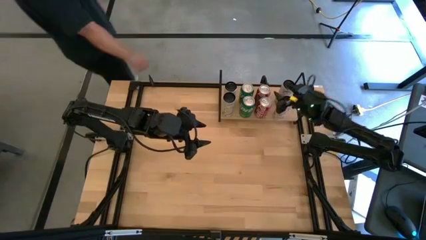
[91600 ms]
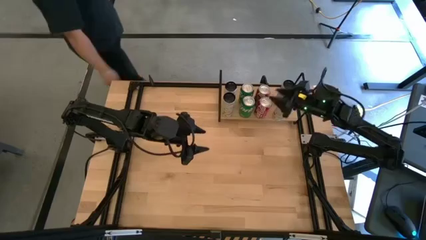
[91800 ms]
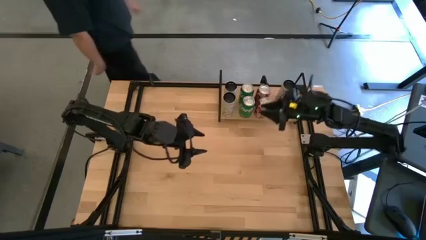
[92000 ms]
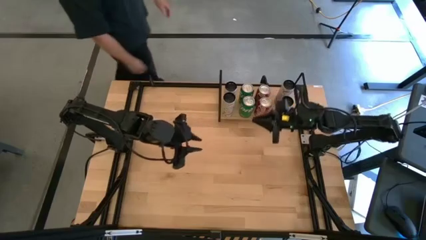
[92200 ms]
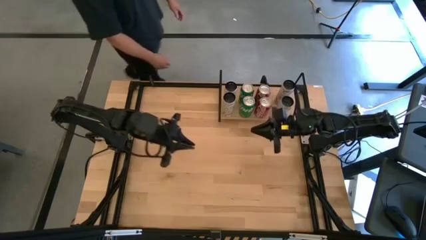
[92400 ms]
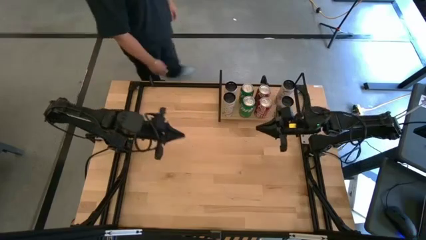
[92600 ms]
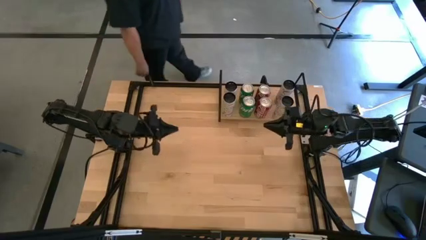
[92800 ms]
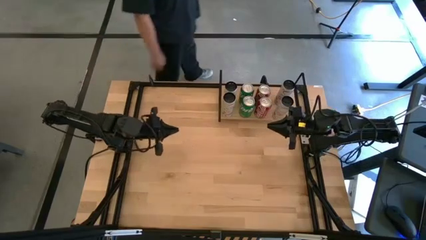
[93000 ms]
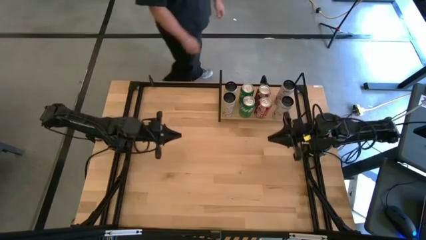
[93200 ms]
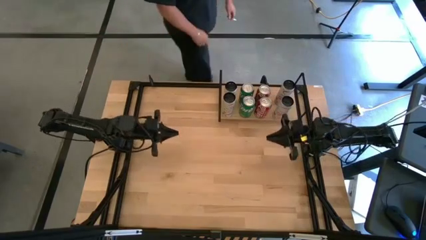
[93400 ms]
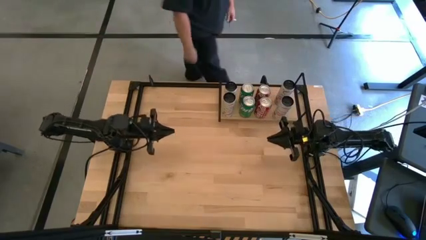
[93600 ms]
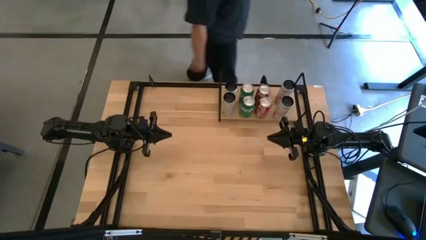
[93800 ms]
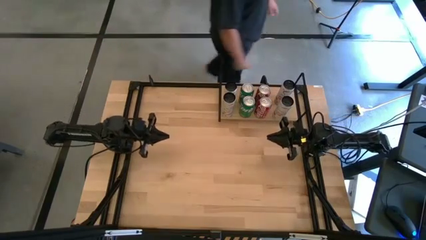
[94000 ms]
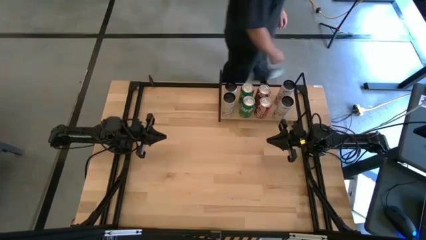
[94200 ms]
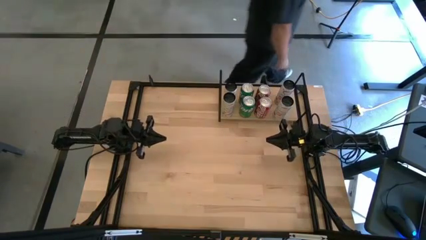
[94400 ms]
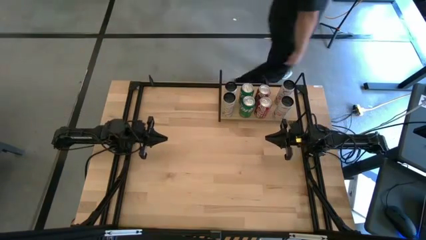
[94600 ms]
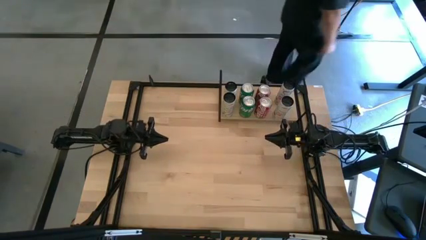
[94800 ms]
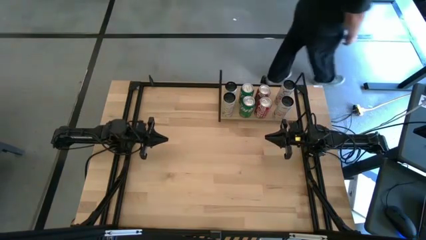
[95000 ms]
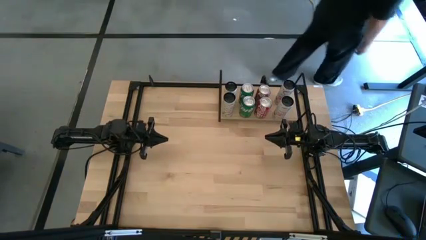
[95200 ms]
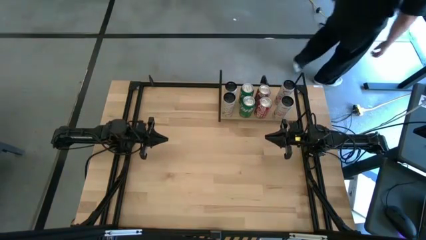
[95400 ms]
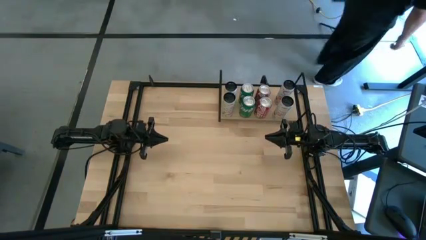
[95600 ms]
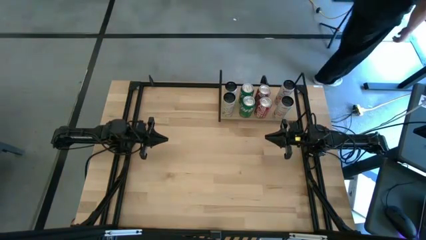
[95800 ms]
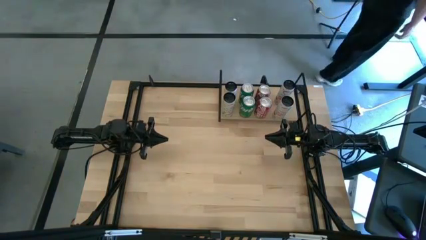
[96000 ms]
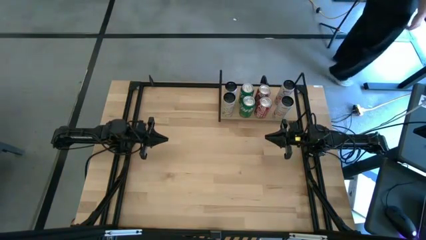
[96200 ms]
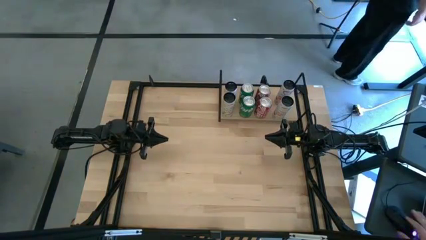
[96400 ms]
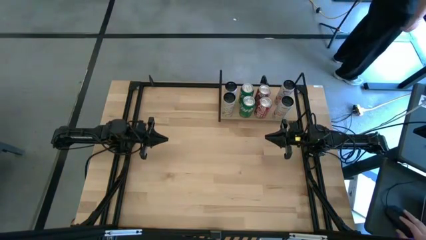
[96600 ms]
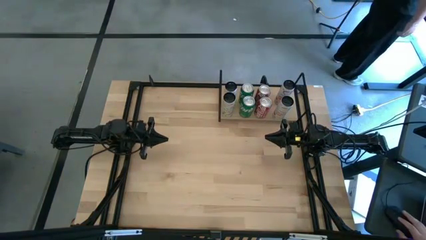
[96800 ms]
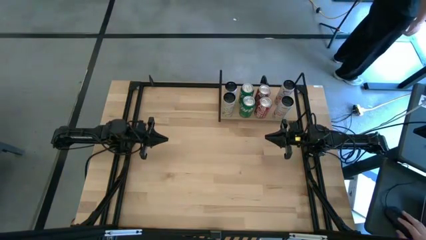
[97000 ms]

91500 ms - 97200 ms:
Task: Place canned beverage on shelf
Return to Home Position

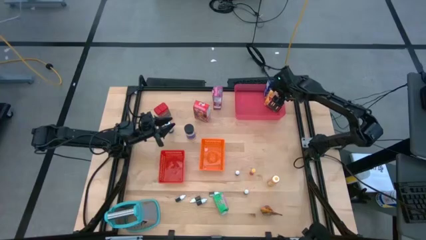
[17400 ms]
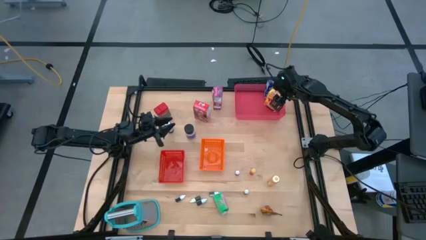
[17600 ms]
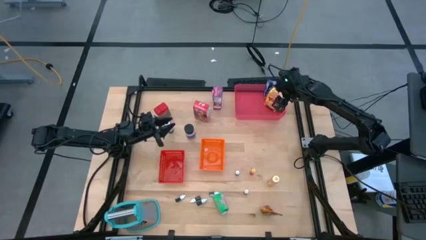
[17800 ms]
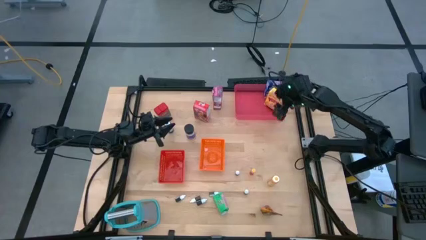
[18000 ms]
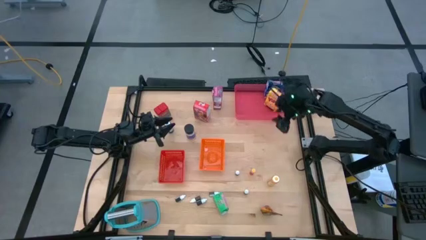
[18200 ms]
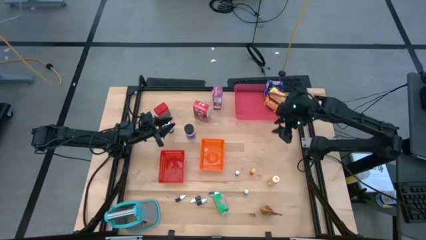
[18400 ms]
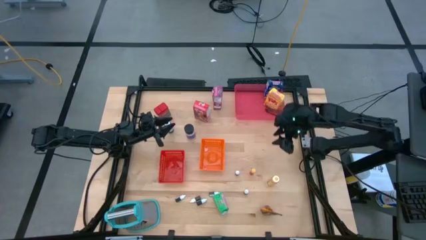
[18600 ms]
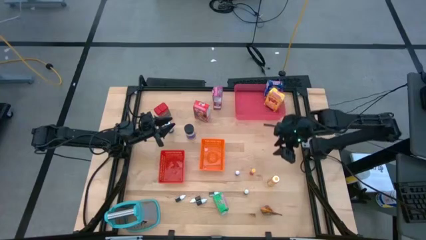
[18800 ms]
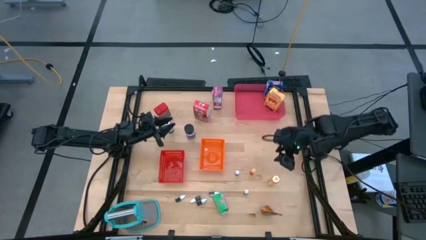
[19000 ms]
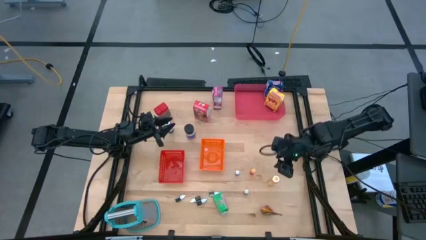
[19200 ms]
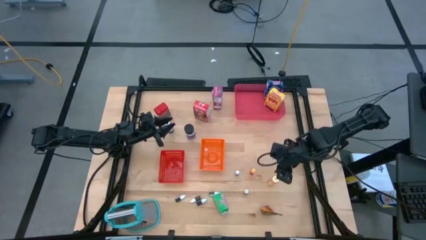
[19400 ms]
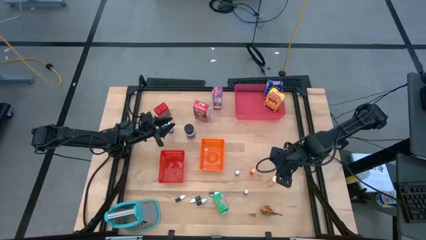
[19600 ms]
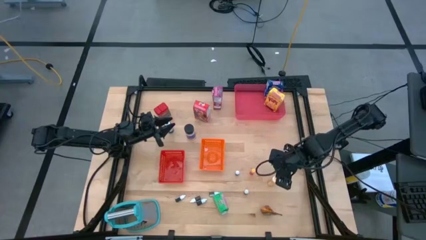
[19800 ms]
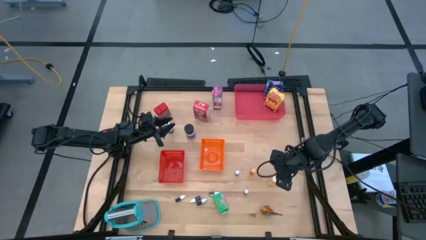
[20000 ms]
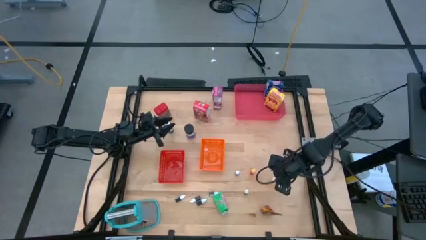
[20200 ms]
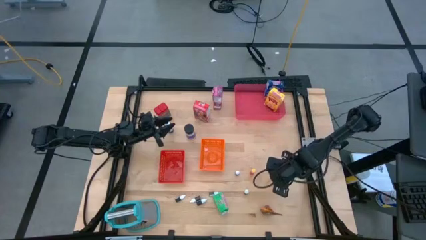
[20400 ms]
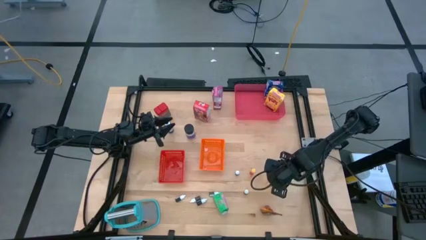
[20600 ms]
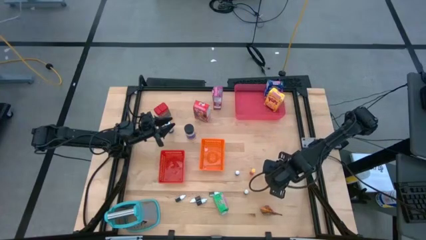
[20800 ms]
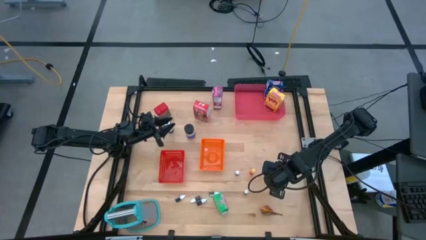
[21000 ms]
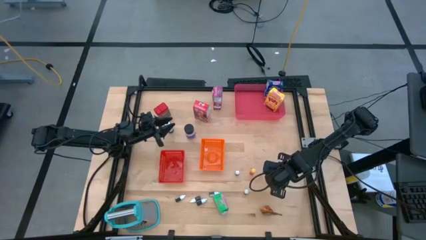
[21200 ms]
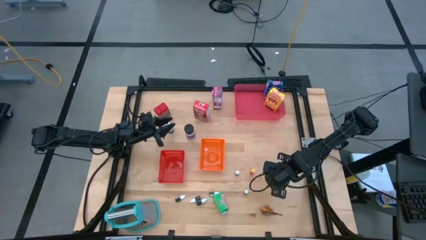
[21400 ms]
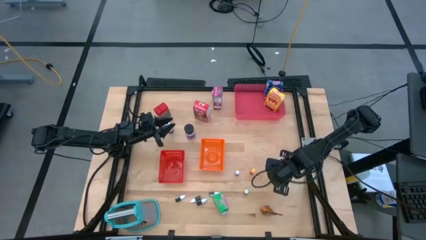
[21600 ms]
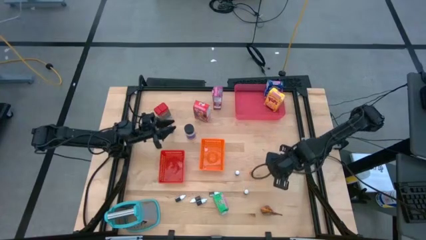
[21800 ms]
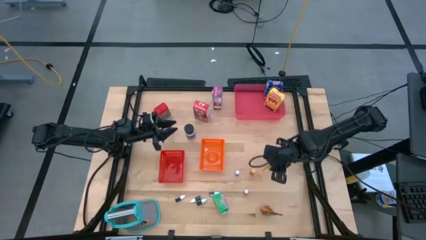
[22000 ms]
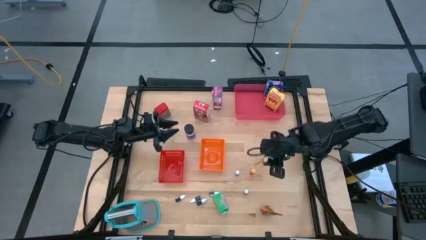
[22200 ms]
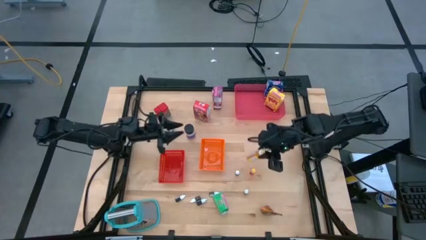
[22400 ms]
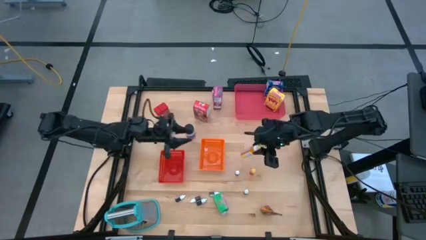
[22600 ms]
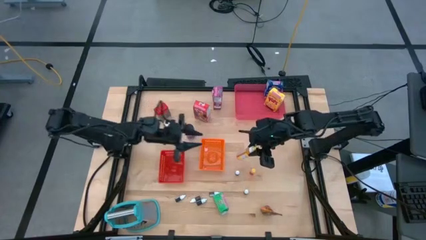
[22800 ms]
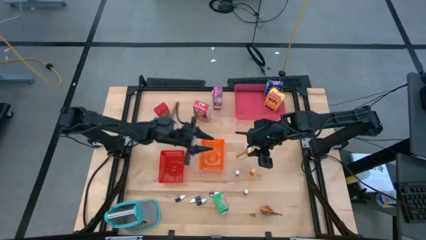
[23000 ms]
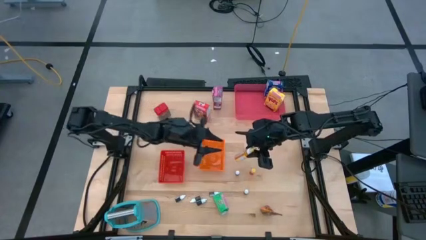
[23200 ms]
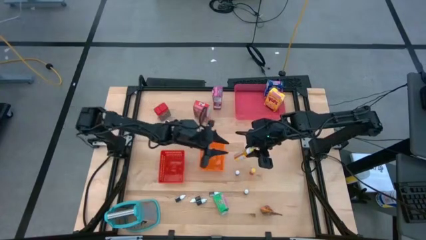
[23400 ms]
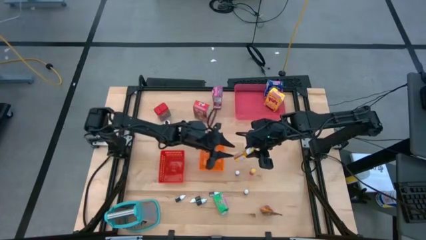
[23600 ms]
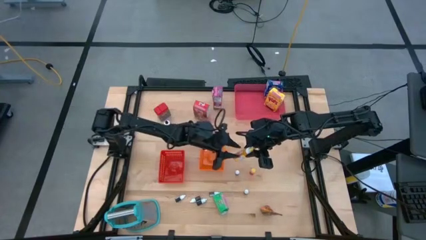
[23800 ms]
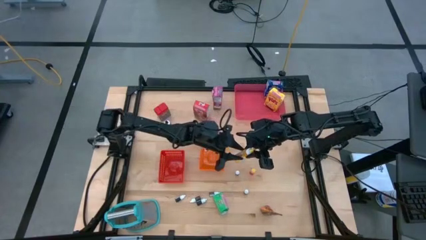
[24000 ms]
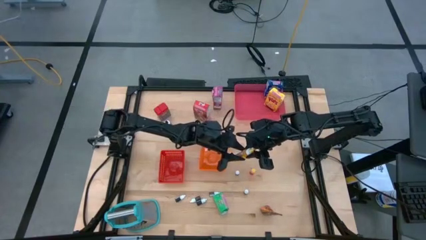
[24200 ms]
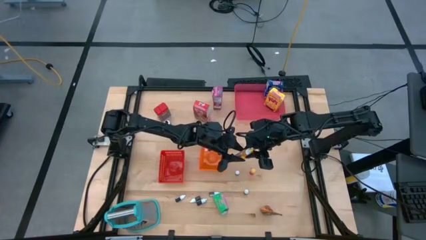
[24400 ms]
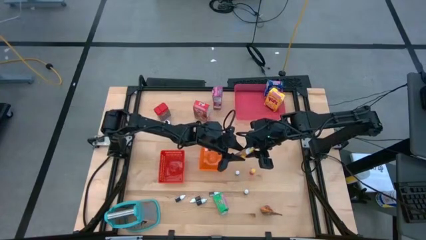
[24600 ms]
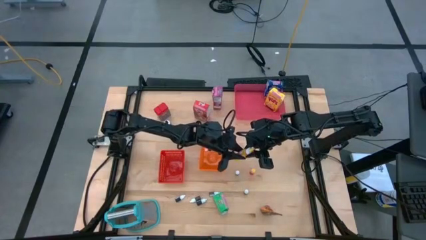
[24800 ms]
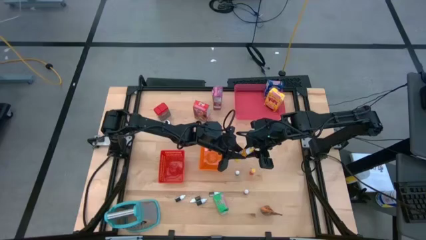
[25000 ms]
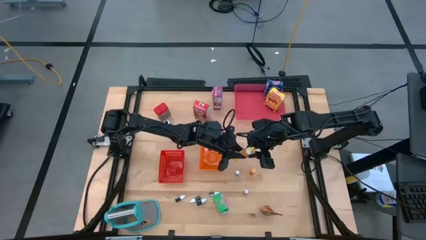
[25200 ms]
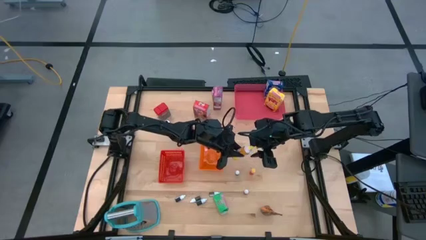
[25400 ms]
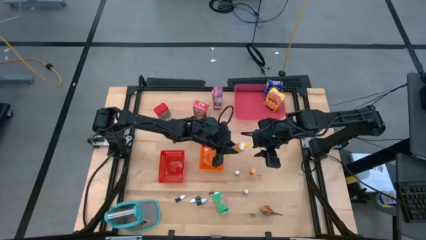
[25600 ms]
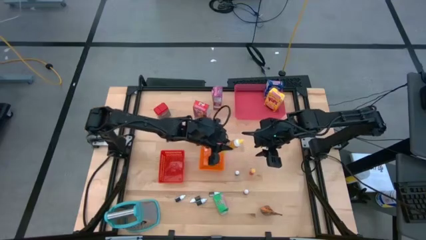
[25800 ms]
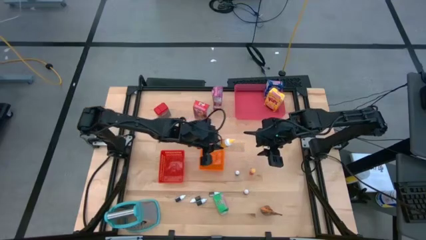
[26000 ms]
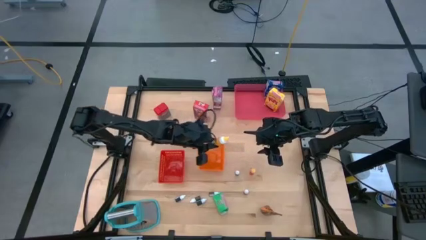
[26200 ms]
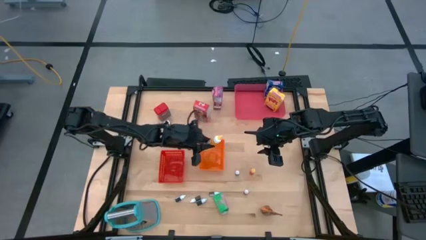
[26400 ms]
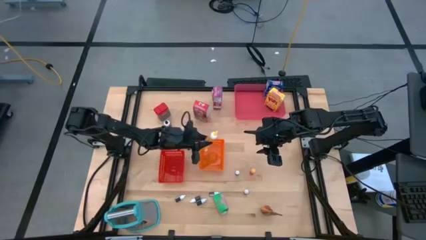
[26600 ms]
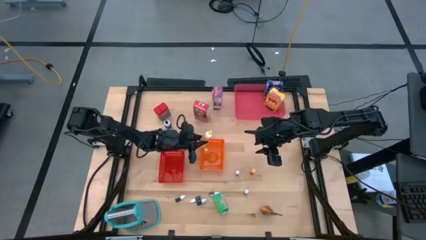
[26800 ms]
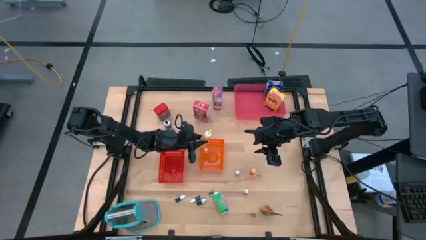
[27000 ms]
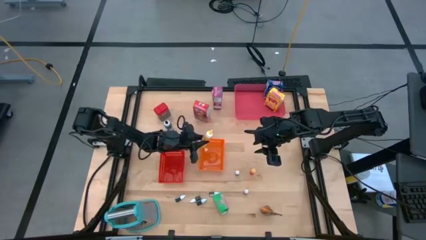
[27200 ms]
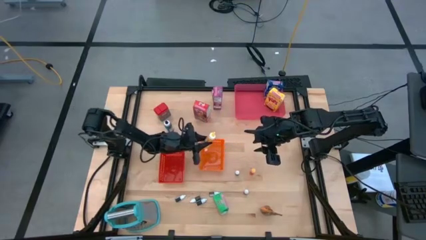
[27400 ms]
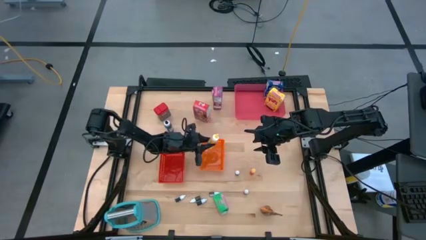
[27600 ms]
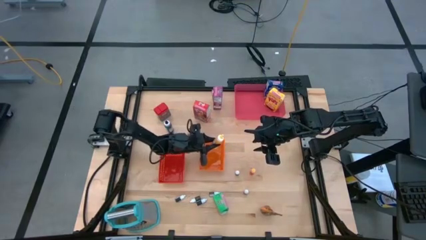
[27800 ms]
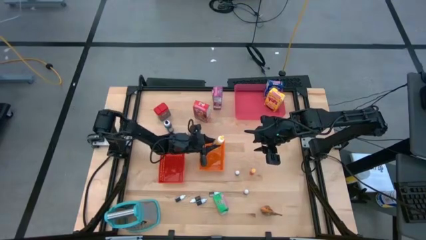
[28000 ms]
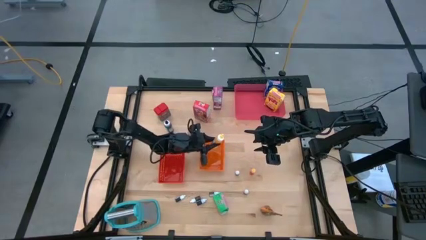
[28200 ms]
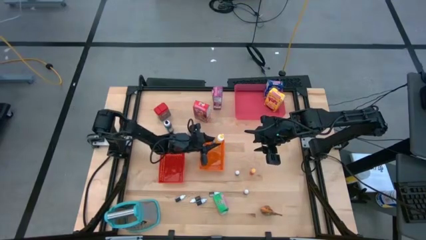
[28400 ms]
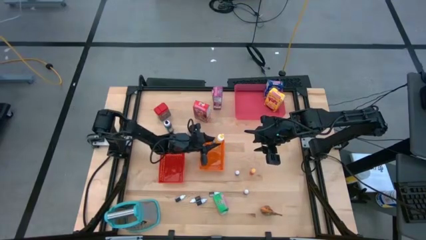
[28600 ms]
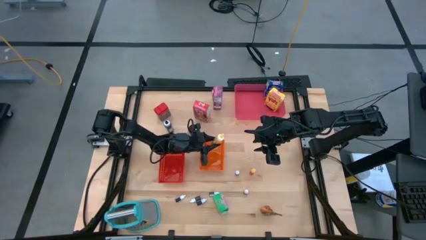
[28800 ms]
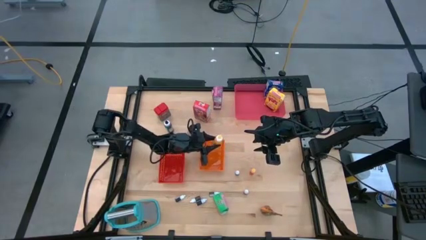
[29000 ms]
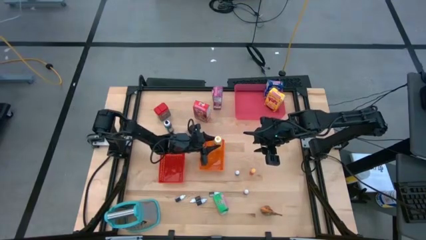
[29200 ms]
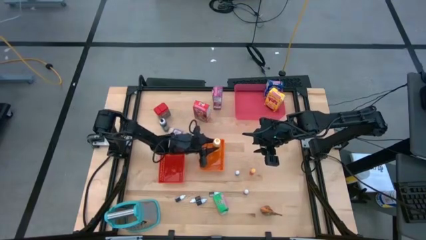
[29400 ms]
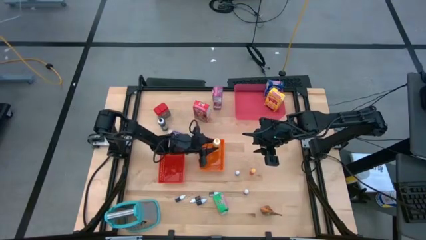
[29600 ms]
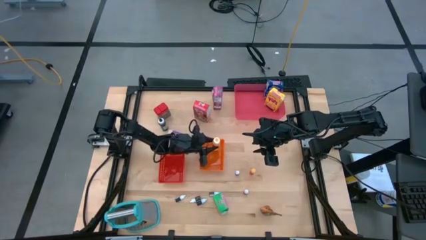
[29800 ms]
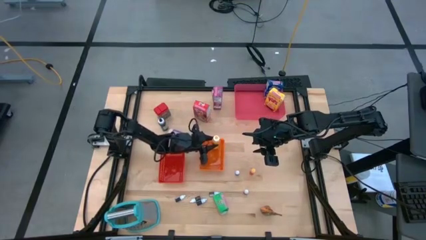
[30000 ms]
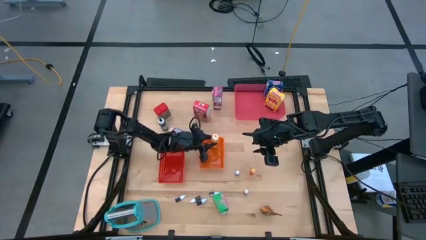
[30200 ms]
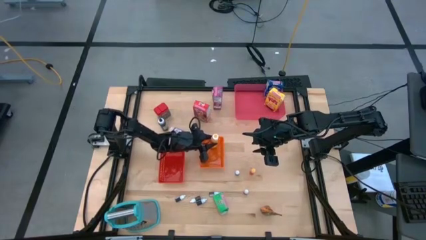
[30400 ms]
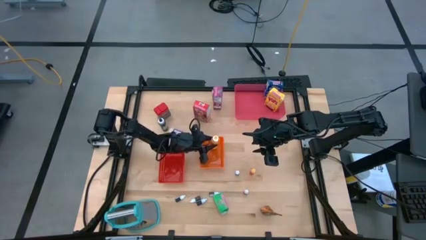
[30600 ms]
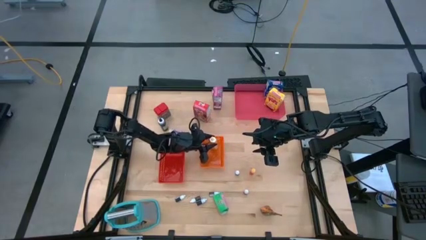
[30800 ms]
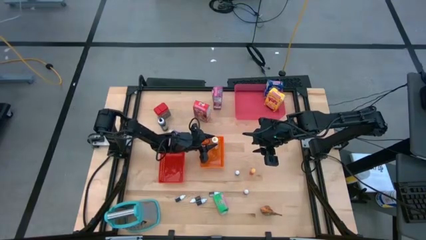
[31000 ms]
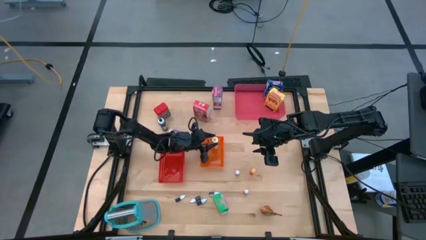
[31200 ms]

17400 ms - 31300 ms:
Task: Pick & Place Kitchen Items
Put the large yellow food coloring bottle into the orange bin
